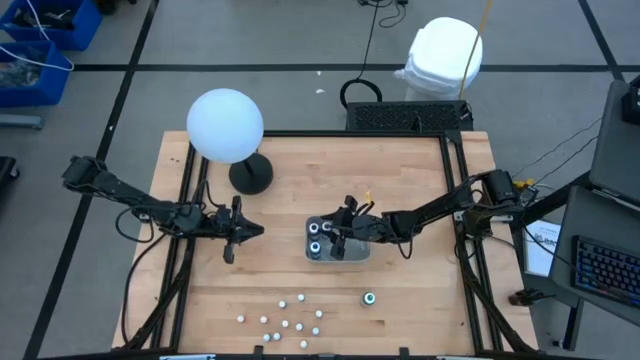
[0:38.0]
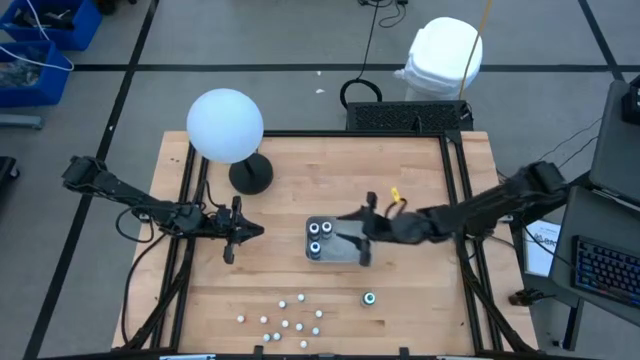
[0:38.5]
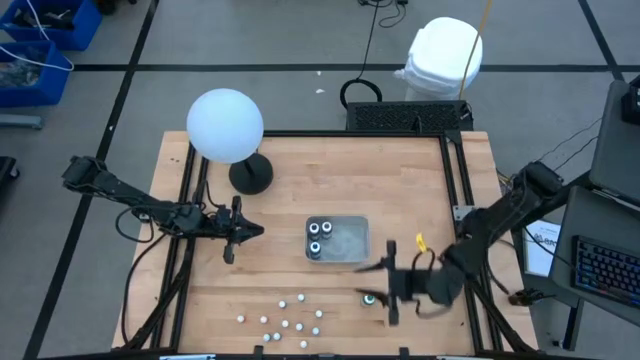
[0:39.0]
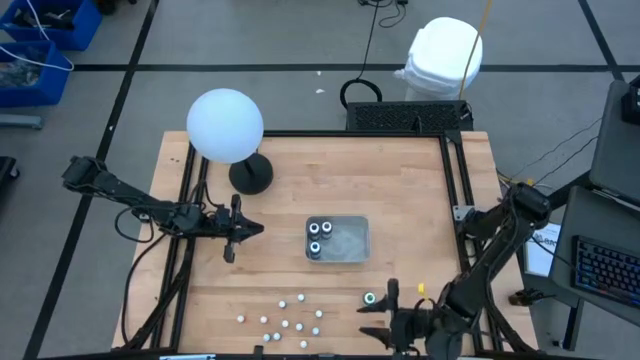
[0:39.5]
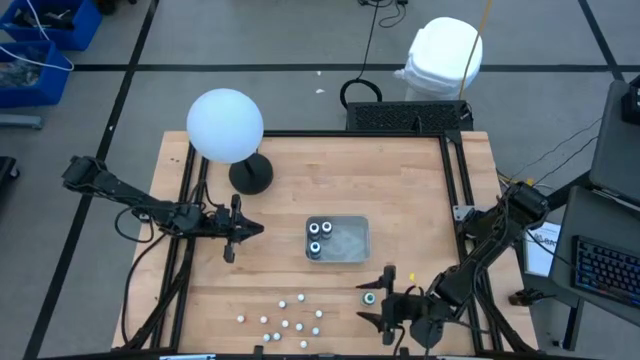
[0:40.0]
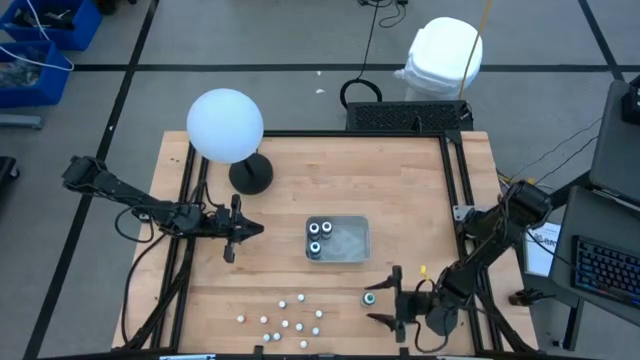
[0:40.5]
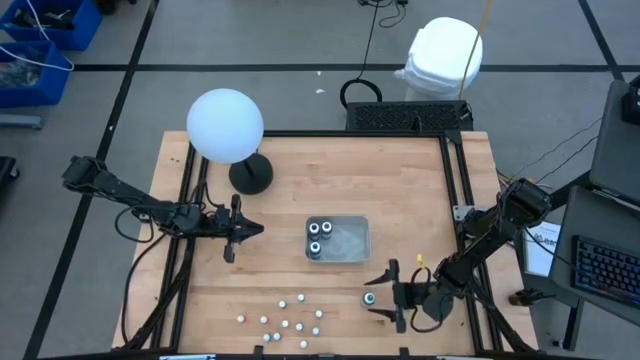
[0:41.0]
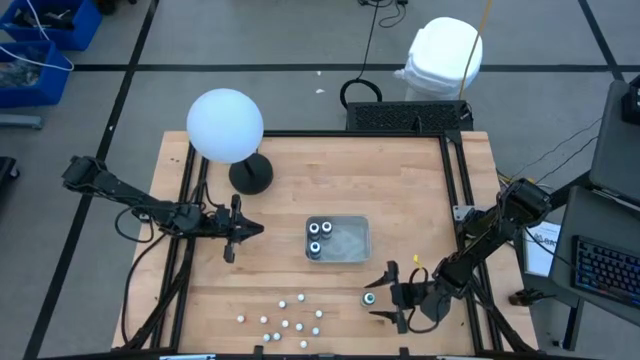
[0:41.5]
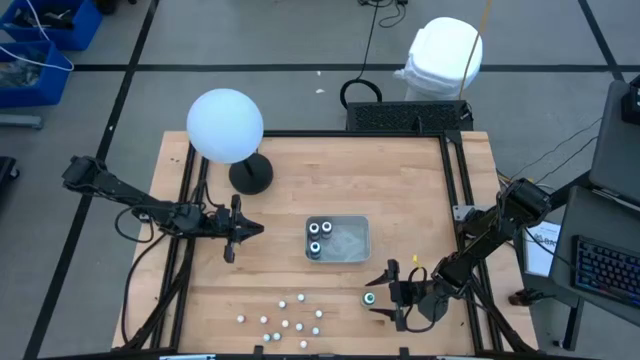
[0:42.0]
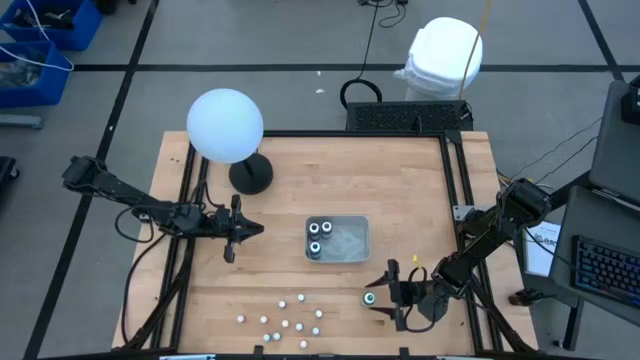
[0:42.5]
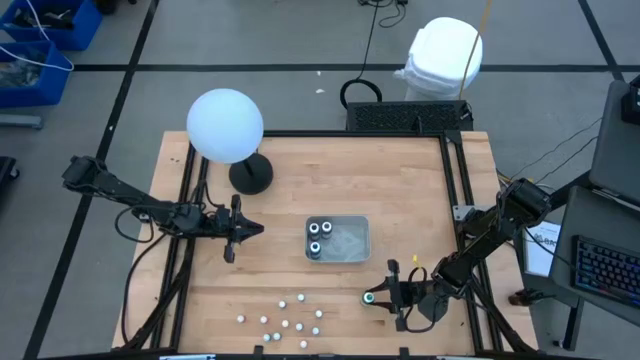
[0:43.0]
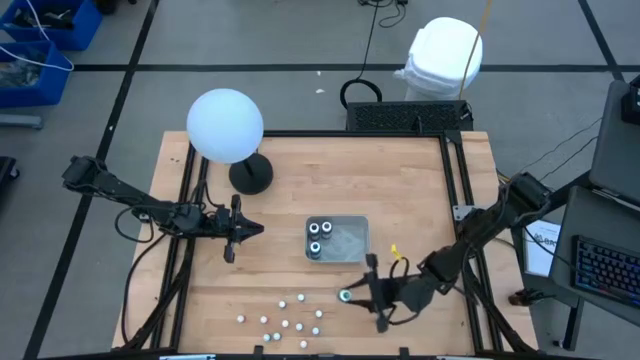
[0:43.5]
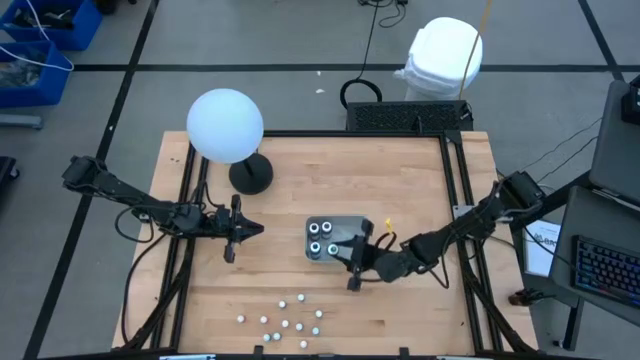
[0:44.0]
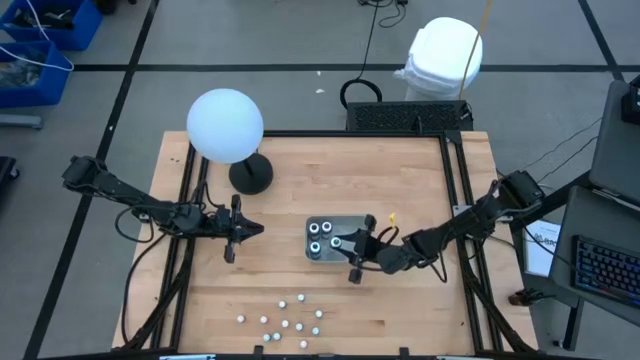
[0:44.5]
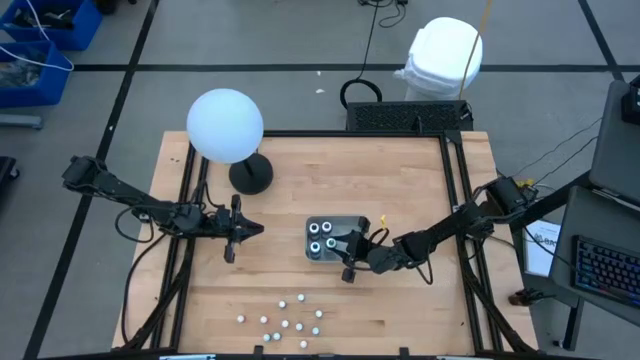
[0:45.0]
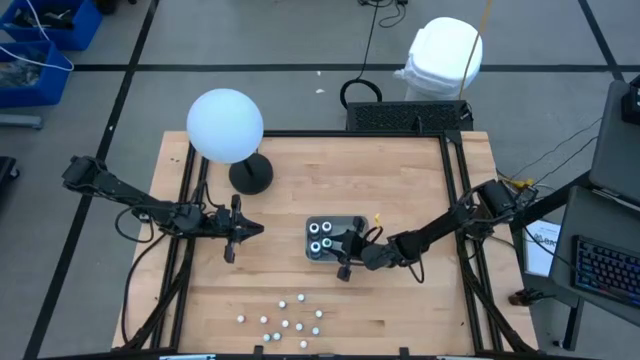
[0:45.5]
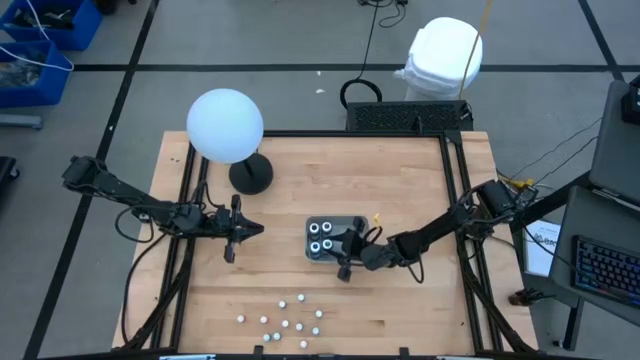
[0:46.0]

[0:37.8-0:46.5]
Task: Pick & Place food coloring
Put the large green food coloring bottle into the gray bin

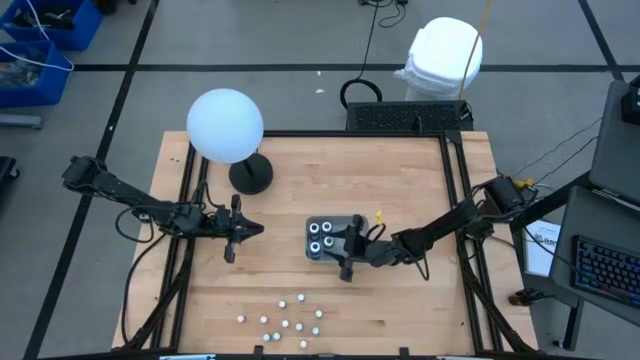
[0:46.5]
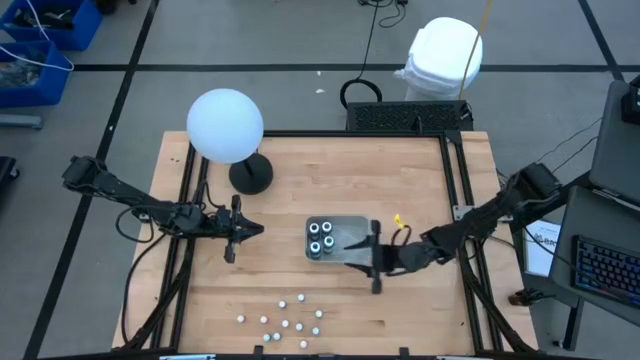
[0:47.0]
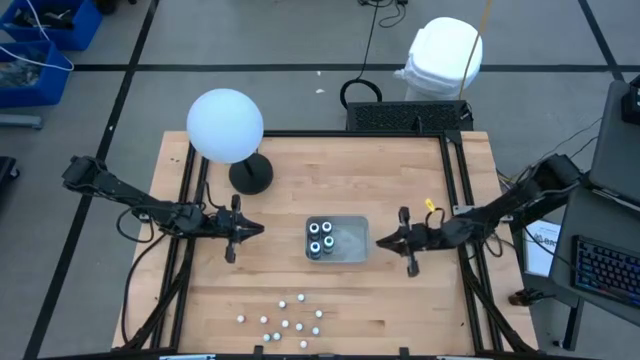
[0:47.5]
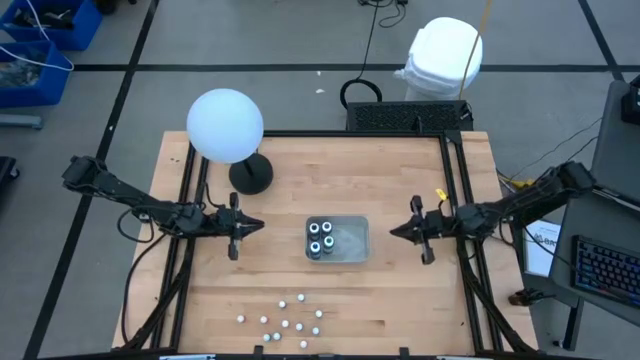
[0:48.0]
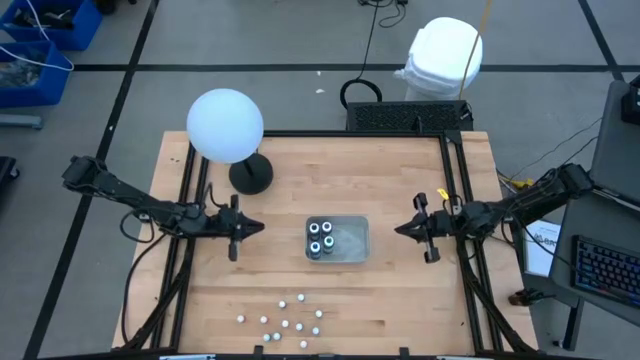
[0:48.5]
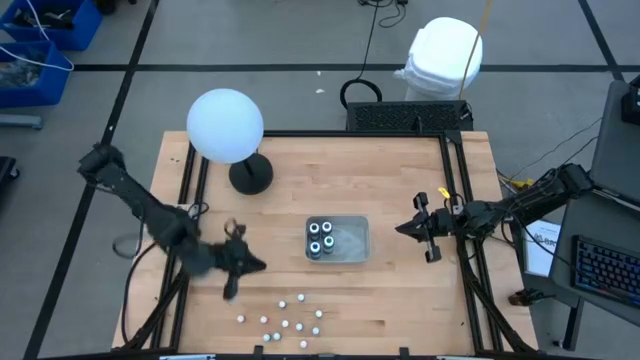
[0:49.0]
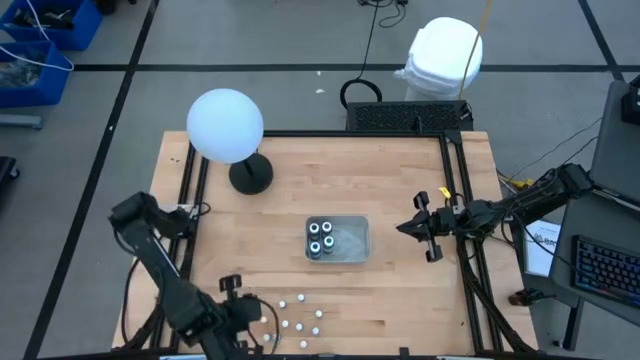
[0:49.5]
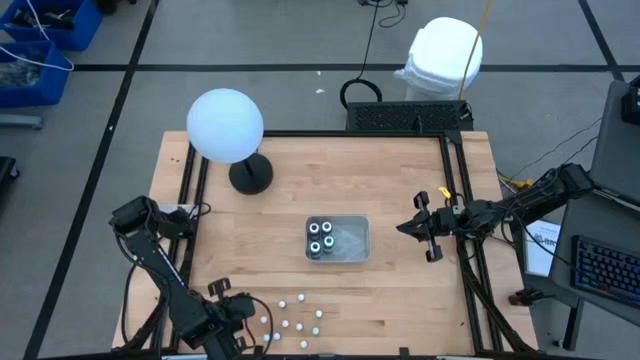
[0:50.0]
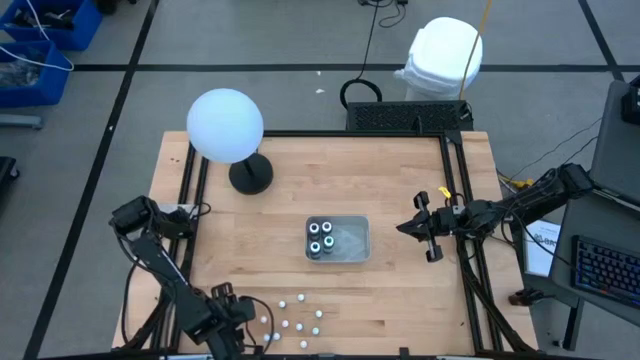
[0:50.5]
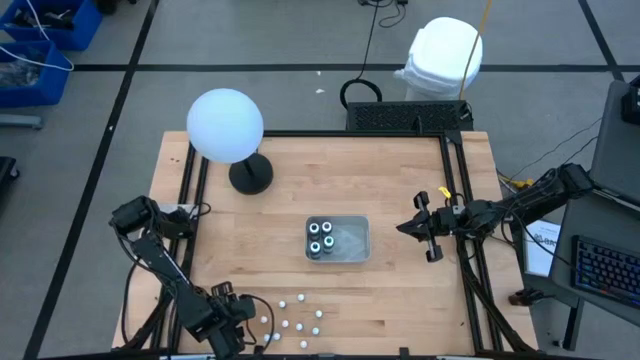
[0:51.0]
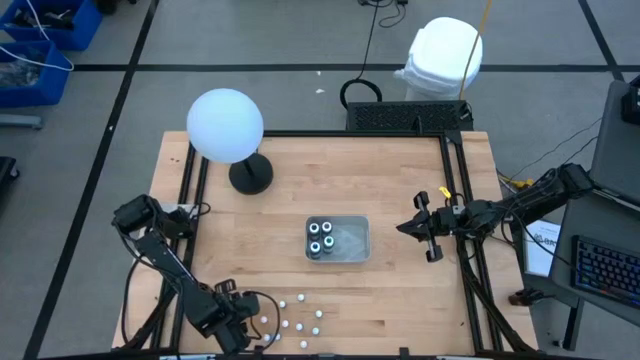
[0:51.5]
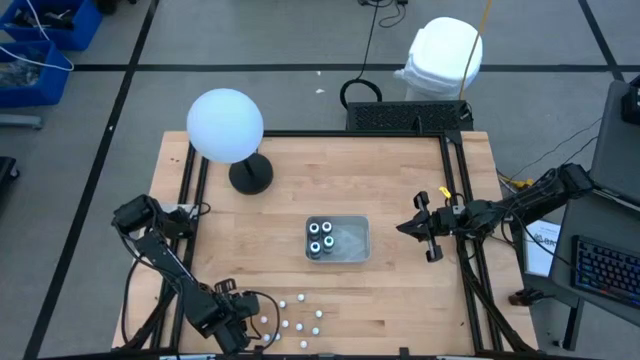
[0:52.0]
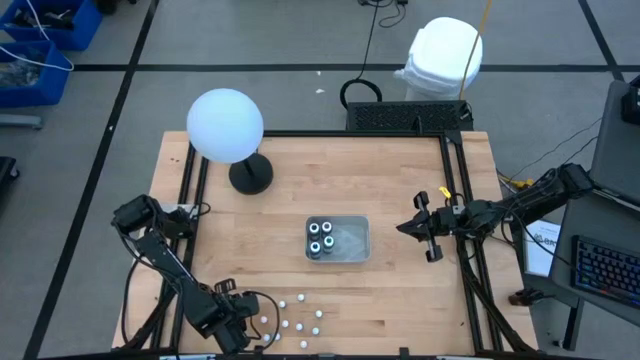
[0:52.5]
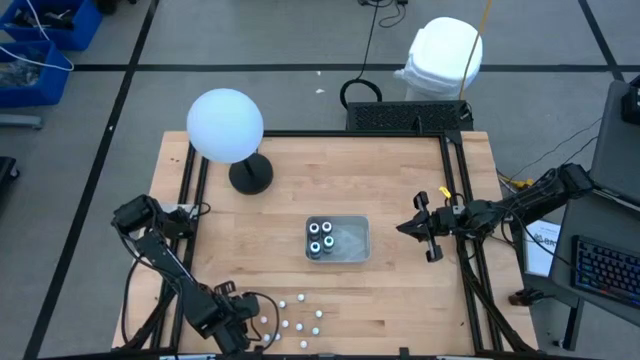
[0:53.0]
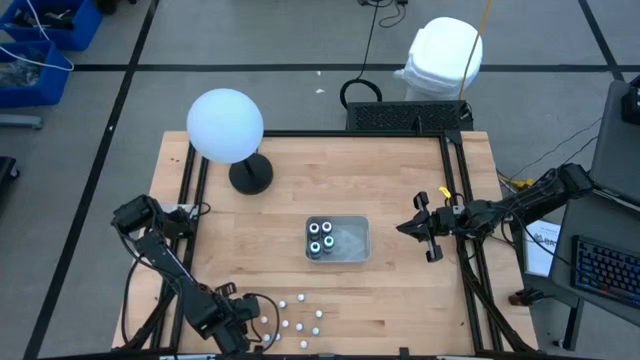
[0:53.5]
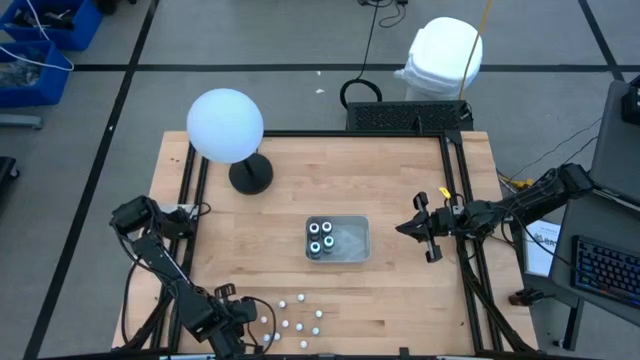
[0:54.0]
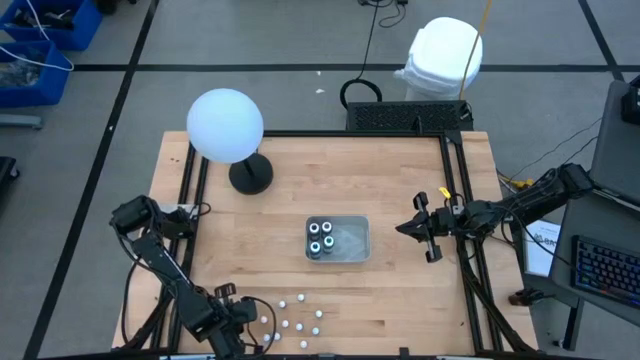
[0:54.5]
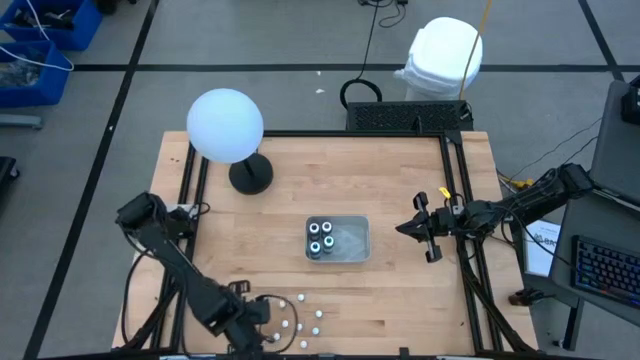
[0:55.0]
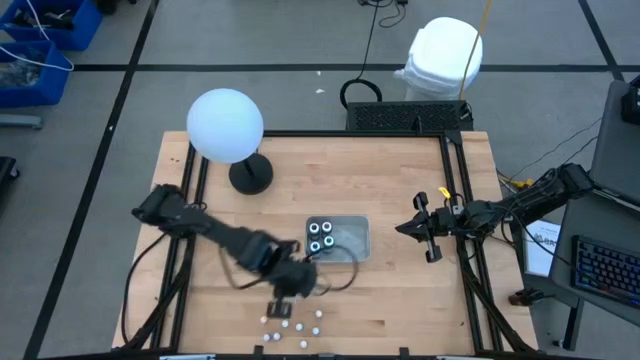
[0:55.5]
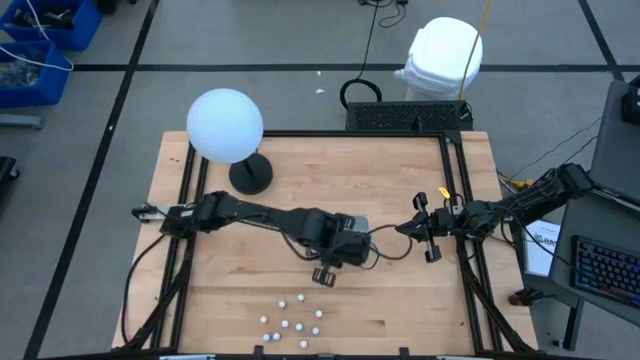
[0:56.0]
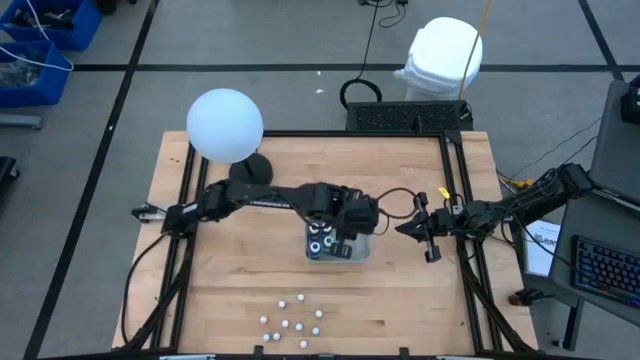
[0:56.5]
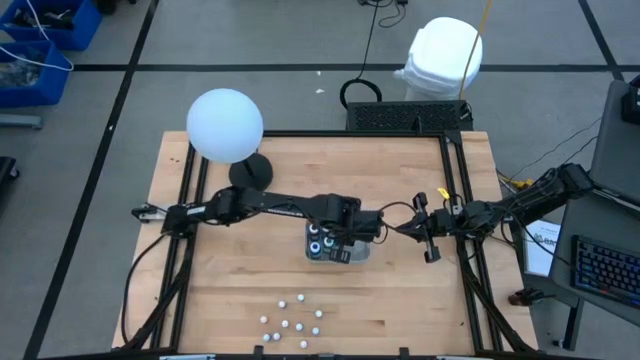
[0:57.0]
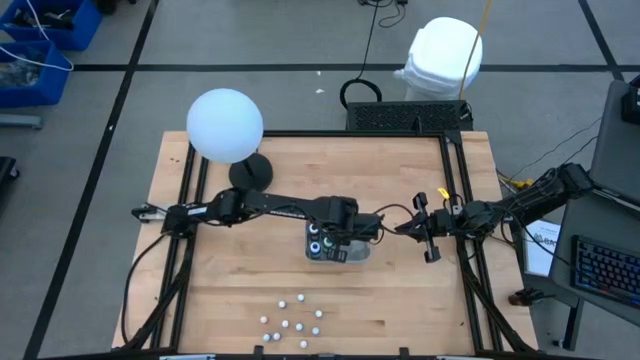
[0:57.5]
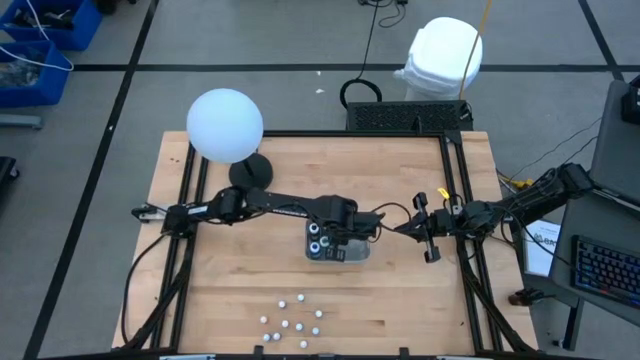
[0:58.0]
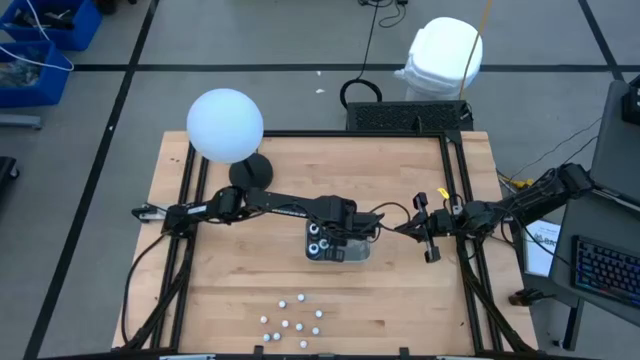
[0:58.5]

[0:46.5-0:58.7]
Put the small orange food coloring bottle into the gray bin

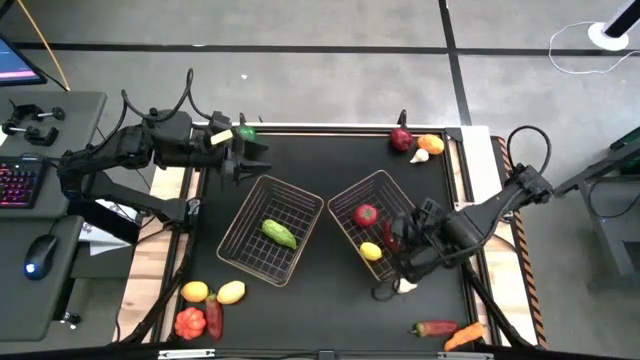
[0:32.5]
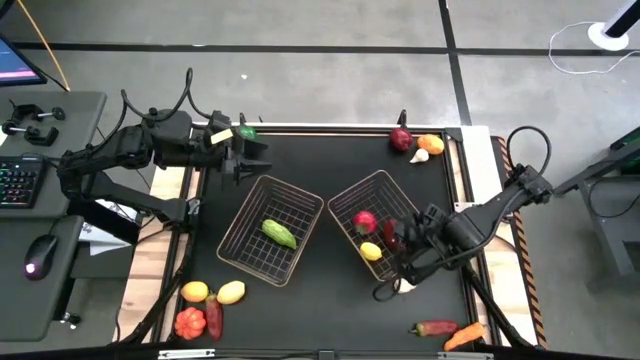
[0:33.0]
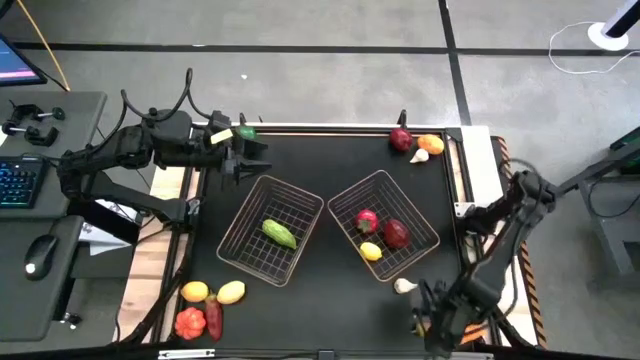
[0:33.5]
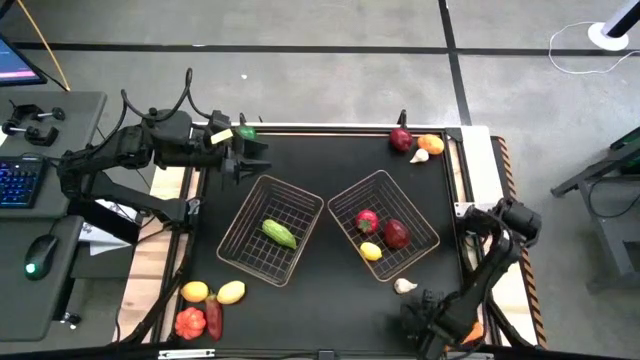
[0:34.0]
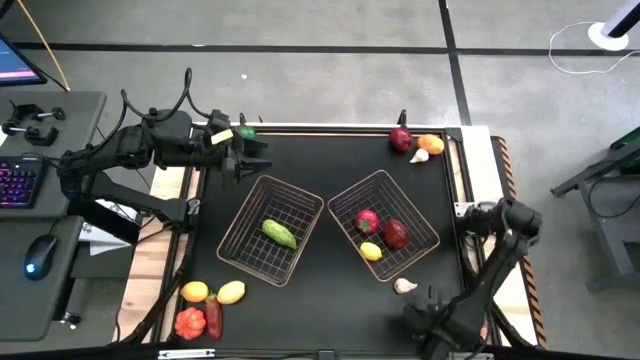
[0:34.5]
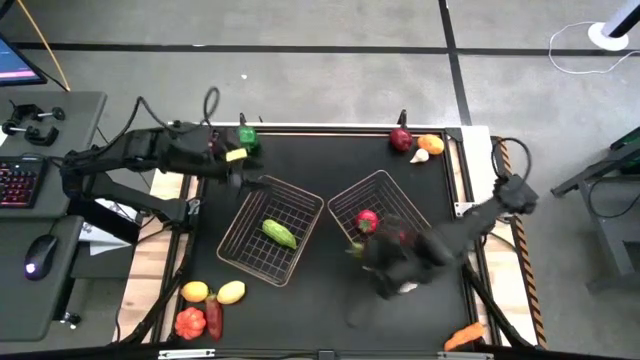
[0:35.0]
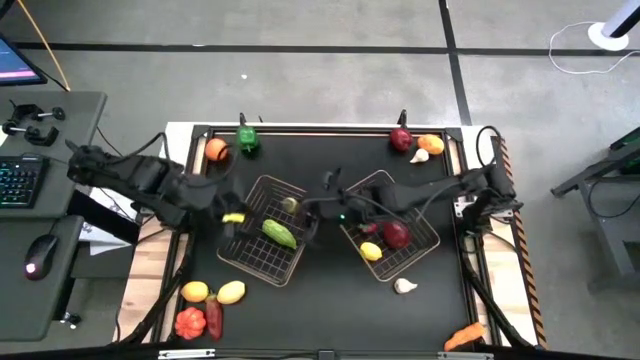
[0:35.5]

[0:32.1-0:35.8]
Task: Sort produce into baskets
Put the right red chili pepper into the left basket
